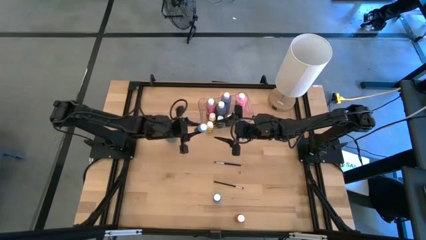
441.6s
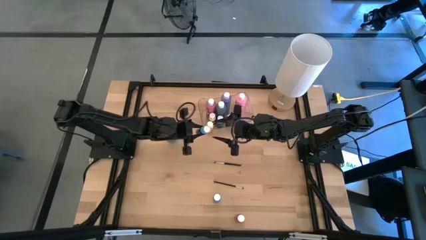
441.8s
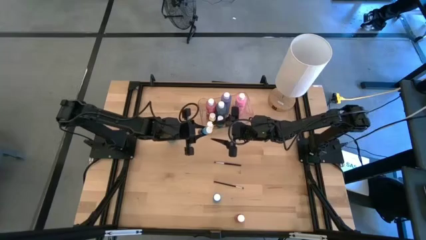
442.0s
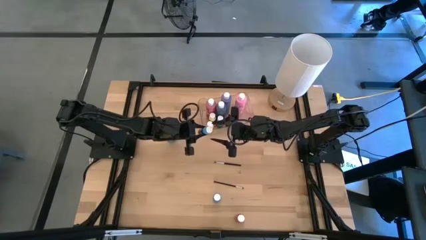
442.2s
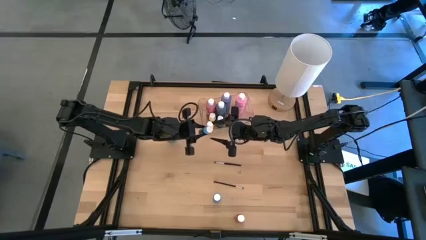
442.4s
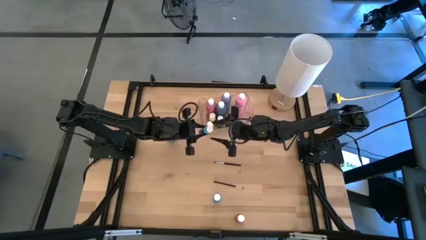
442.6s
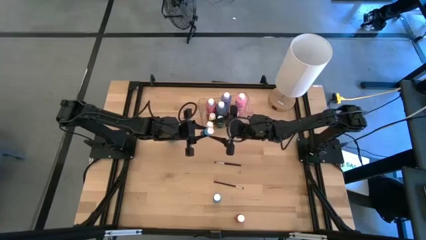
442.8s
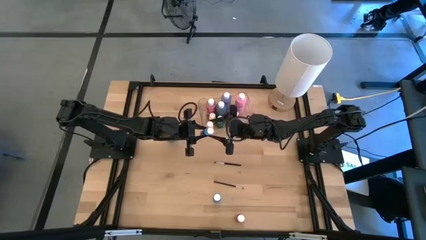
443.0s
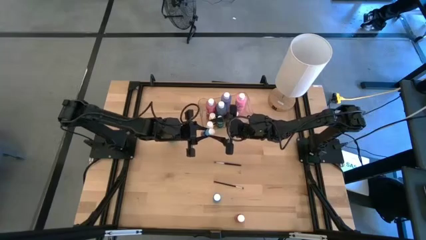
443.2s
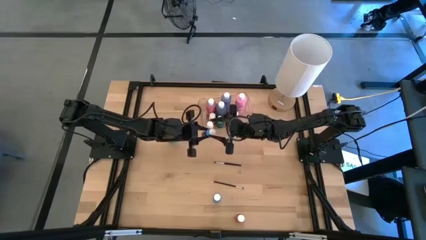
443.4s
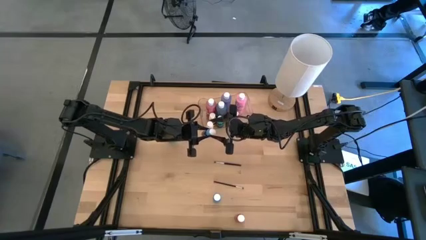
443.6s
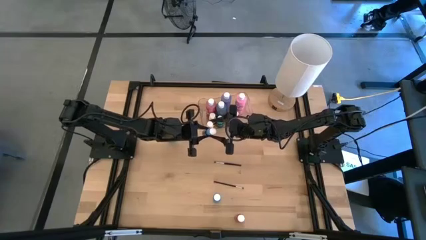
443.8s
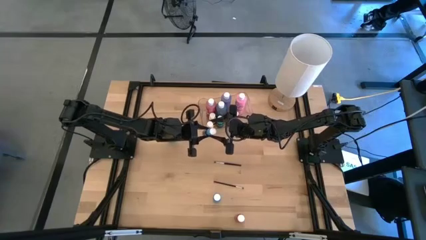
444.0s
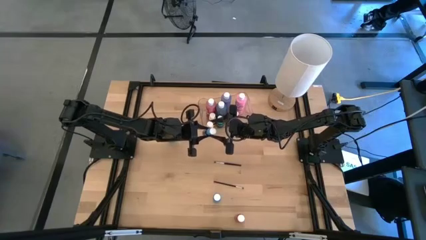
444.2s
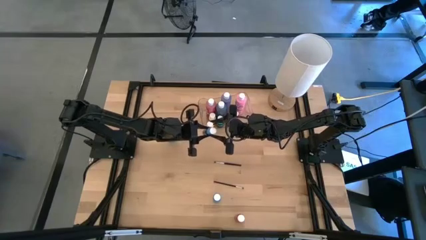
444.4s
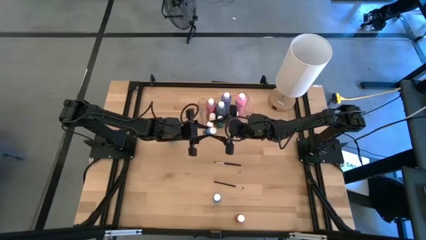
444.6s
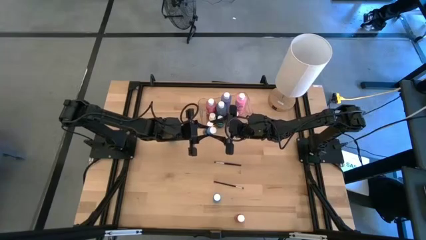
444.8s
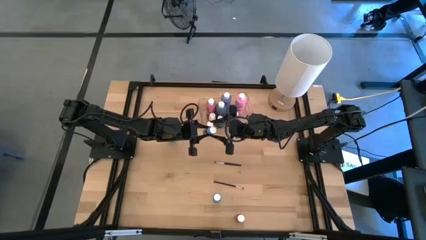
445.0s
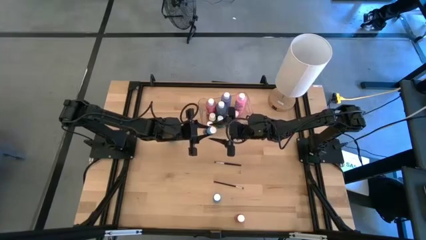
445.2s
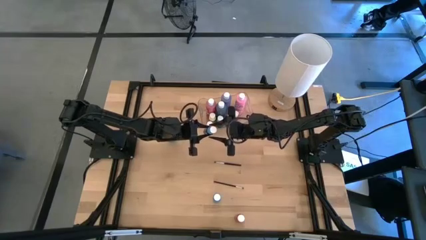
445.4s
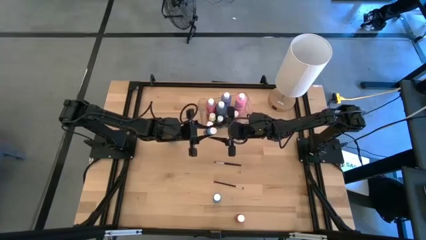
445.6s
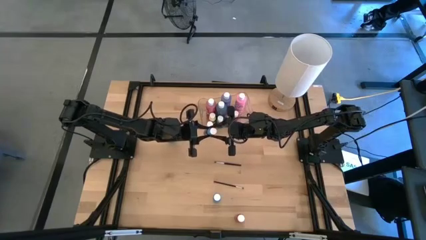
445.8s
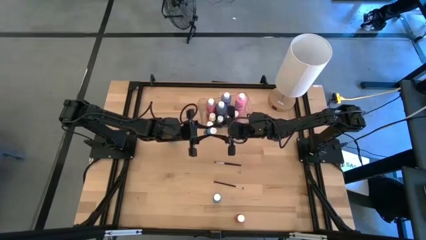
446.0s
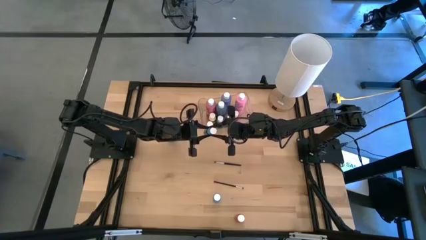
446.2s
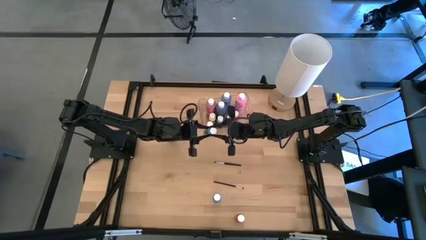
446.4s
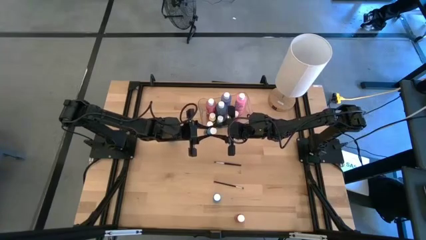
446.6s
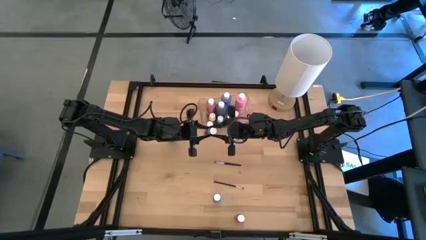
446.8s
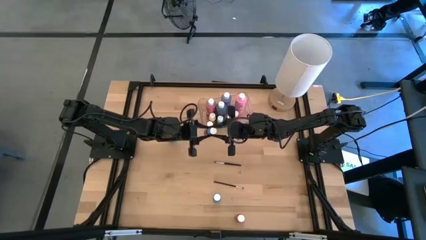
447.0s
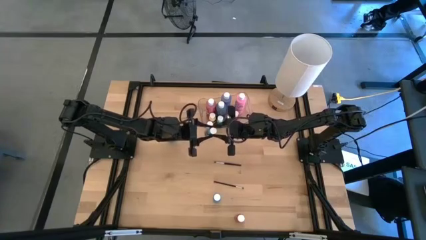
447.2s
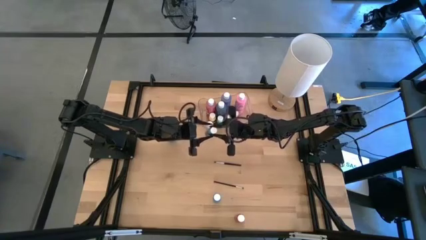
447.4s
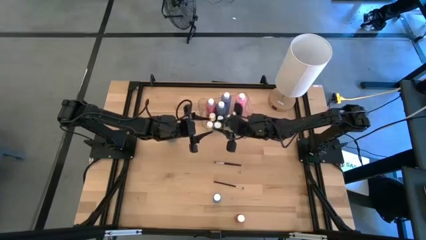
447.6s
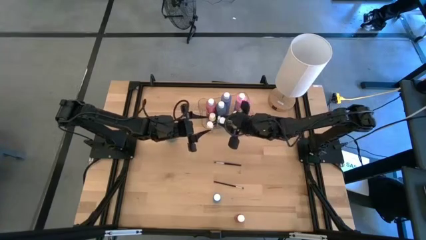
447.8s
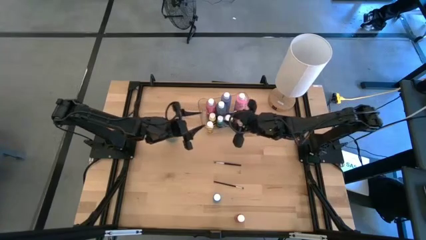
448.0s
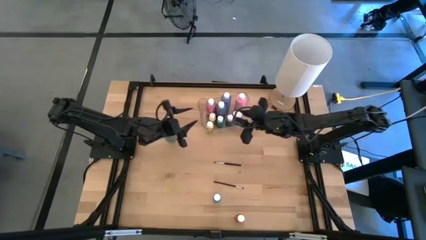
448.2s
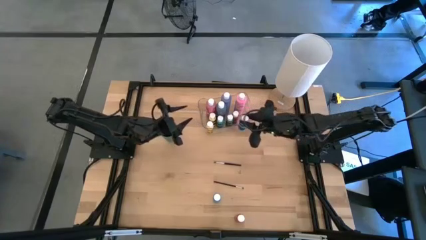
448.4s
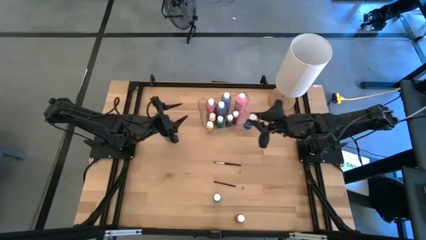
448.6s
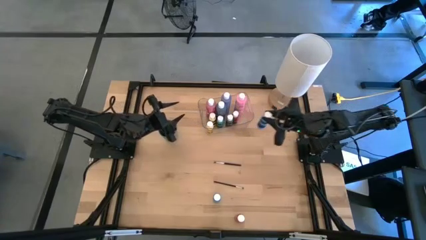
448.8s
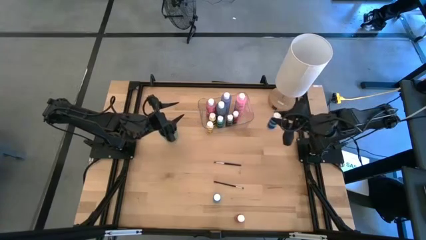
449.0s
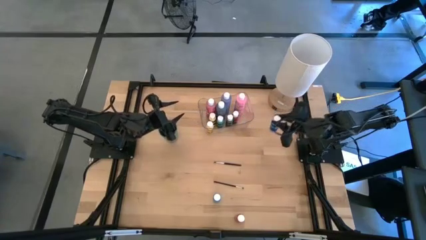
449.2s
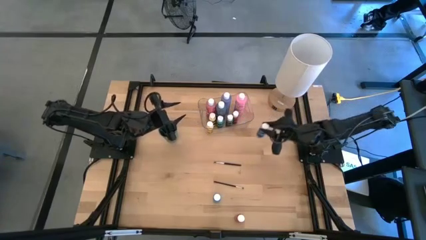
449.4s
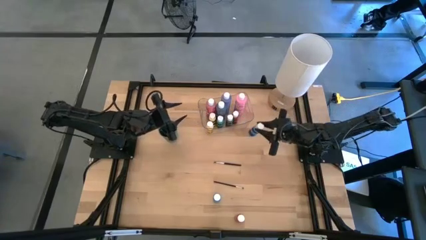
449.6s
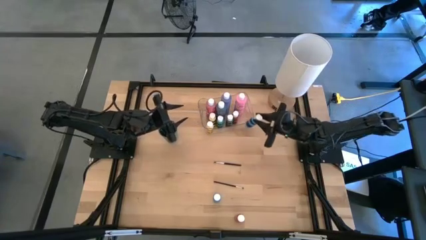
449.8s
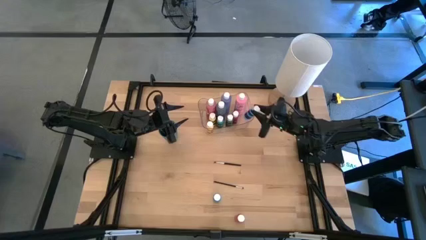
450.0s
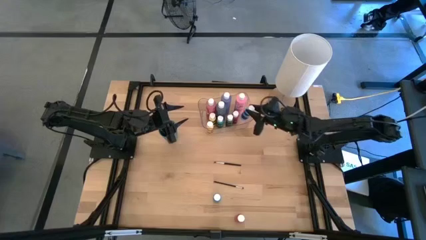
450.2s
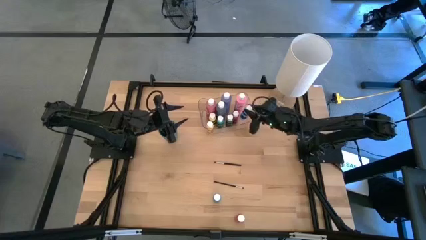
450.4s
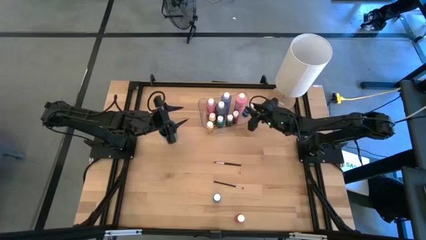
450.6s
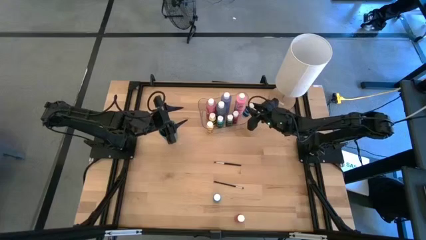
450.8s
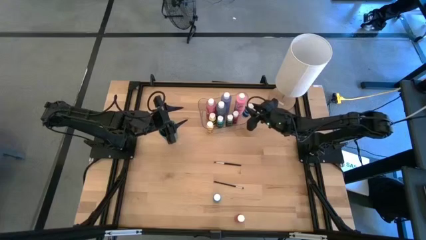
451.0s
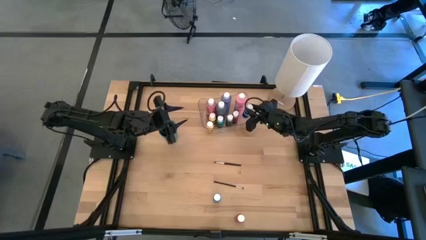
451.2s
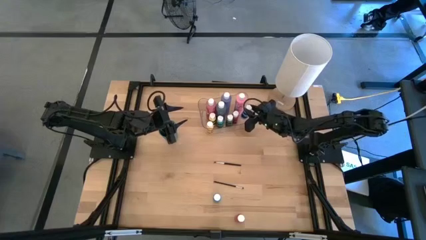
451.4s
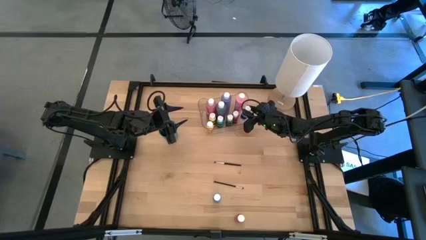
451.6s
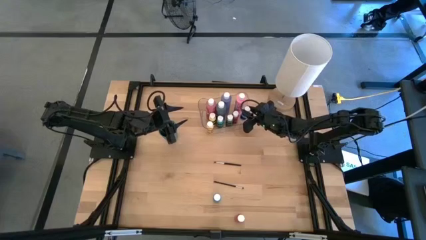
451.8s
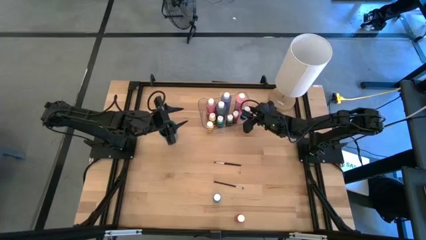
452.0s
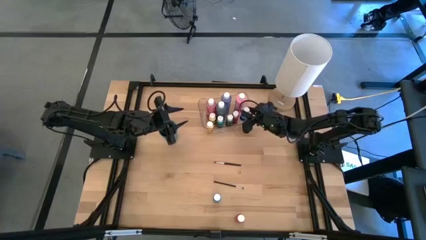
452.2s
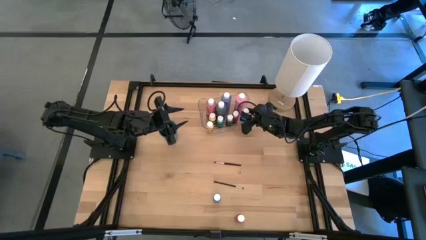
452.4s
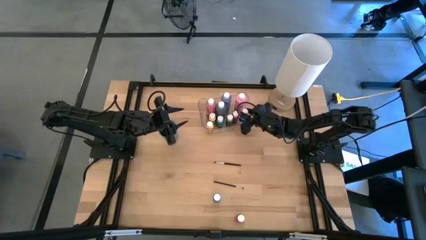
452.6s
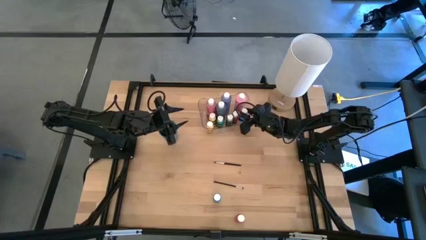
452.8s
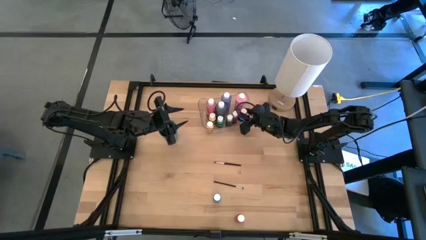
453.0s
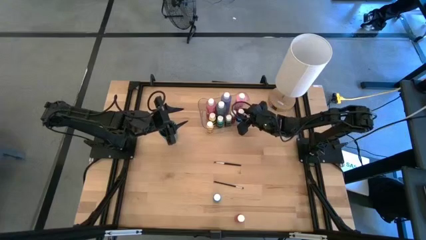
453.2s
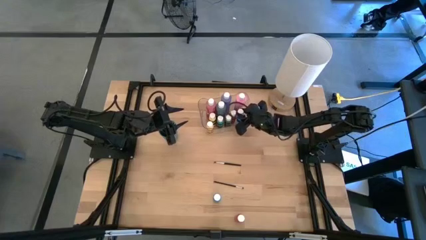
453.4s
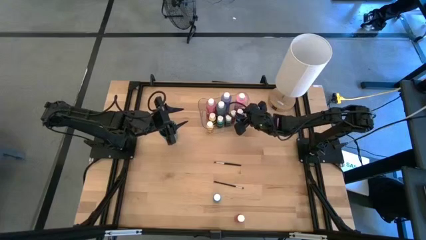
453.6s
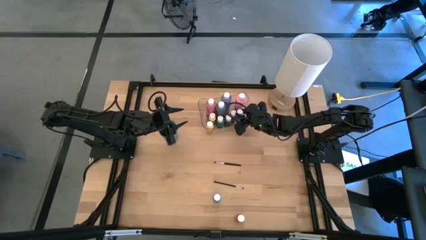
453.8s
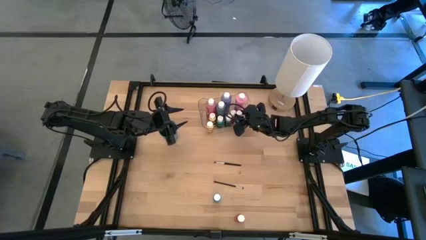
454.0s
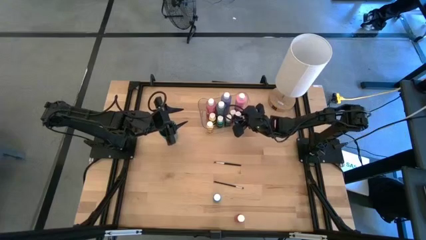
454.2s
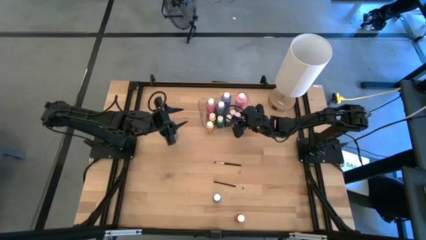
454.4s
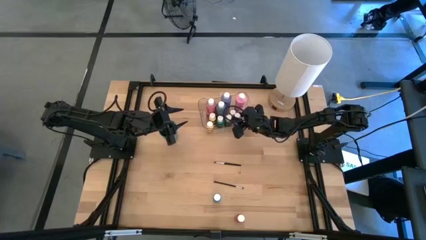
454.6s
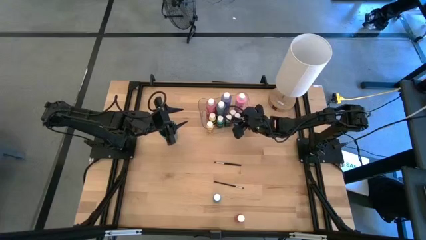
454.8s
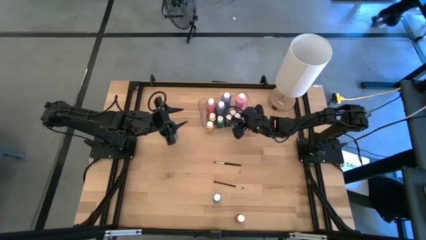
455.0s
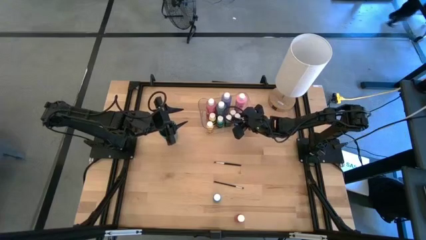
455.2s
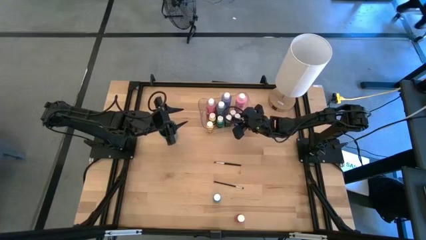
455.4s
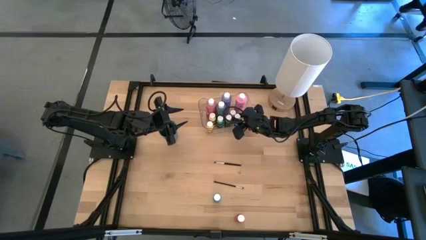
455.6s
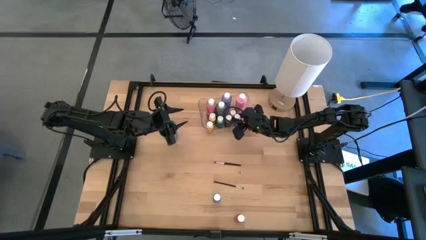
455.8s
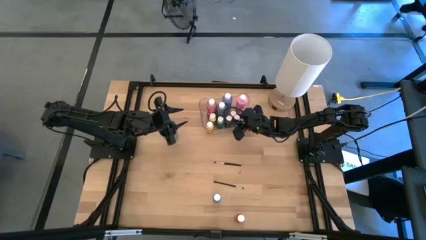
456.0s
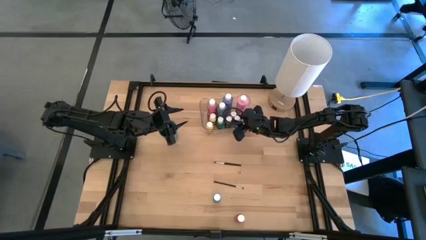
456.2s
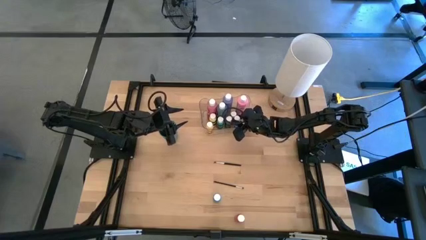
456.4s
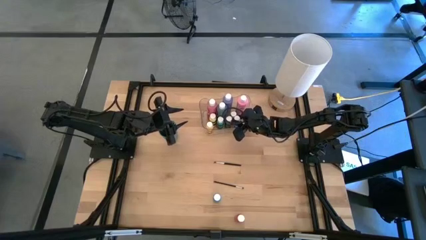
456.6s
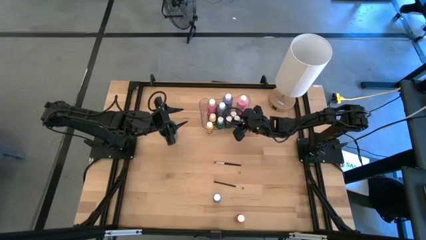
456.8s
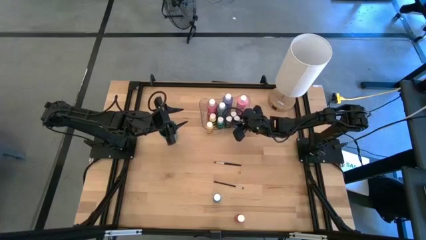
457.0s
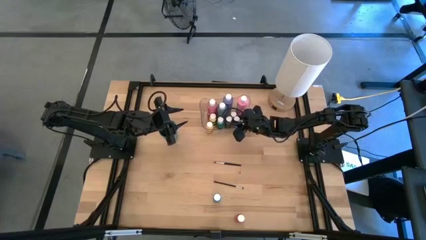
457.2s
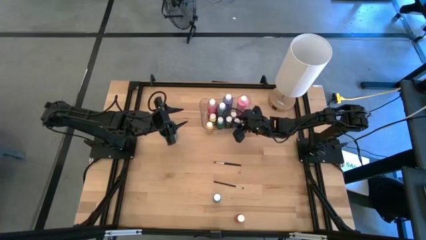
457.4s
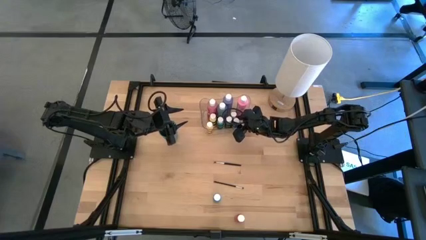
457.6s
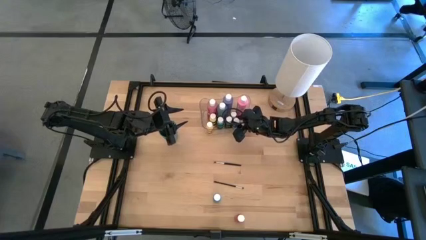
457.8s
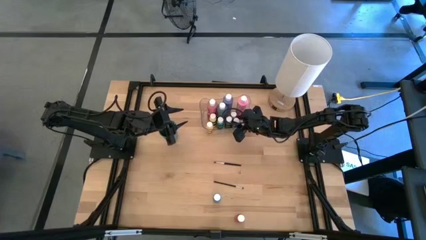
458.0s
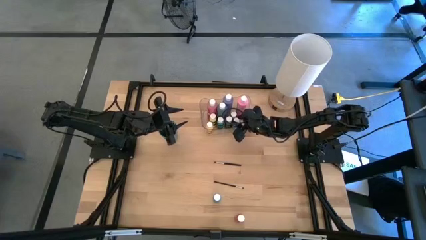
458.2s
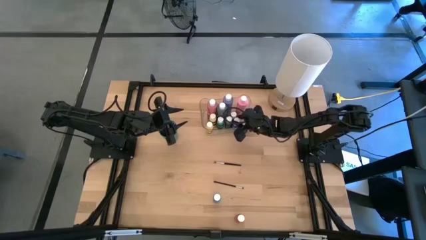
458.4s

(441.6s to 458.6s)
Task: Pick & Place Paint Supplies
Put the blue paint bottle into the transparent bin
